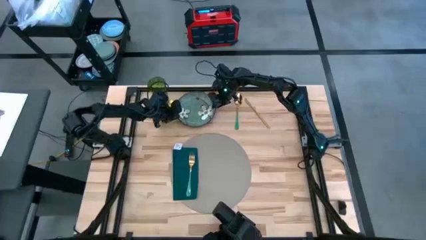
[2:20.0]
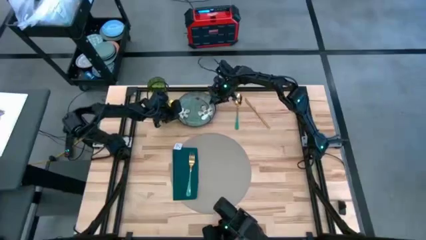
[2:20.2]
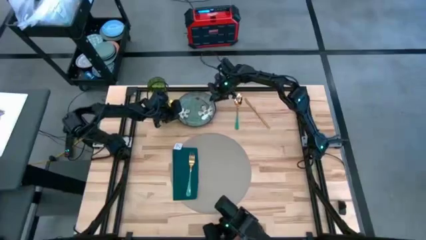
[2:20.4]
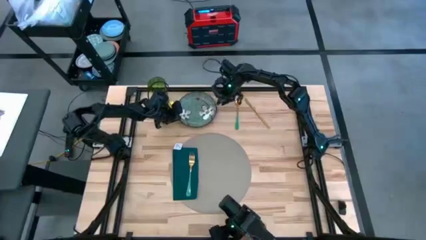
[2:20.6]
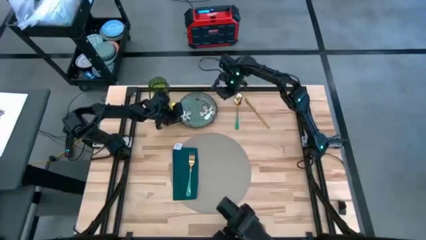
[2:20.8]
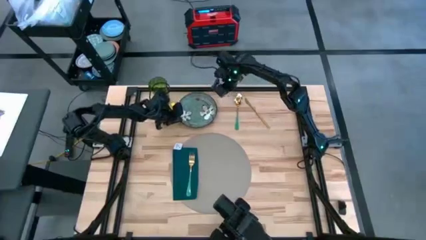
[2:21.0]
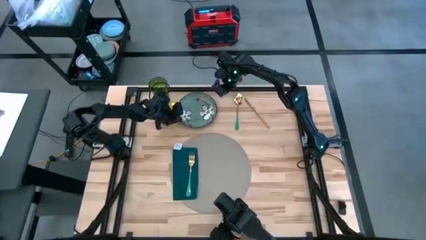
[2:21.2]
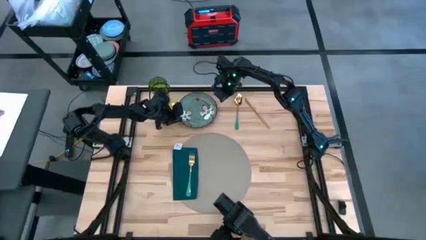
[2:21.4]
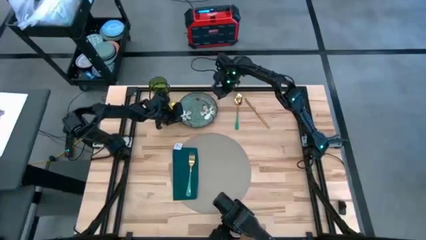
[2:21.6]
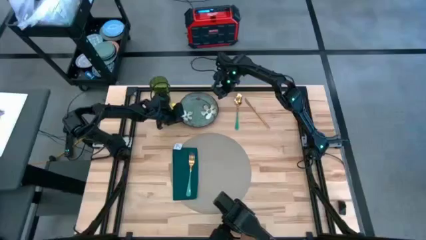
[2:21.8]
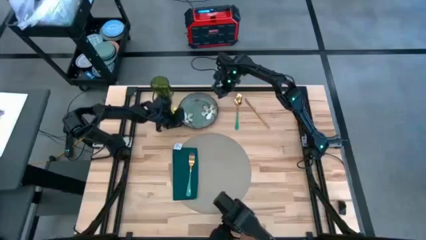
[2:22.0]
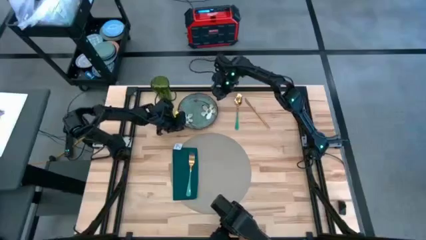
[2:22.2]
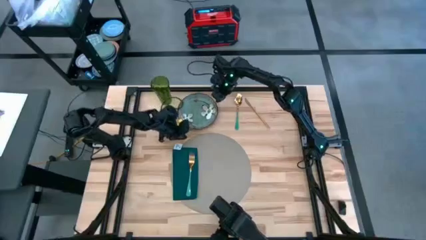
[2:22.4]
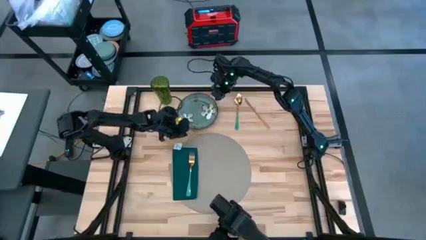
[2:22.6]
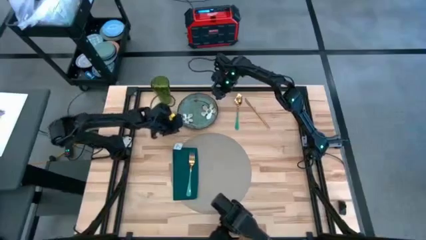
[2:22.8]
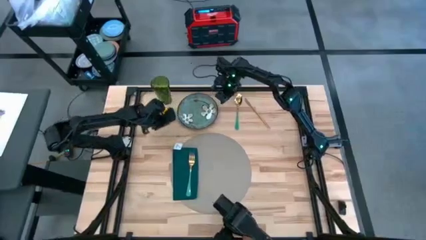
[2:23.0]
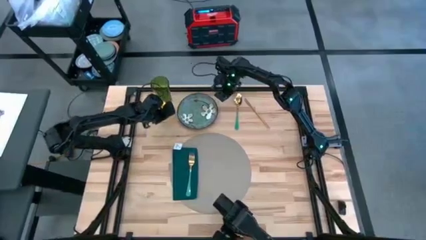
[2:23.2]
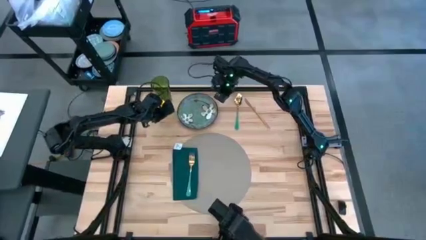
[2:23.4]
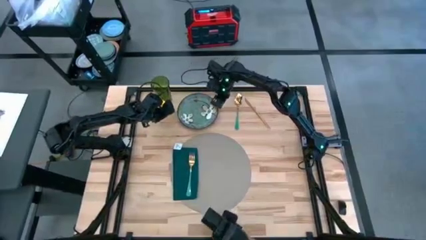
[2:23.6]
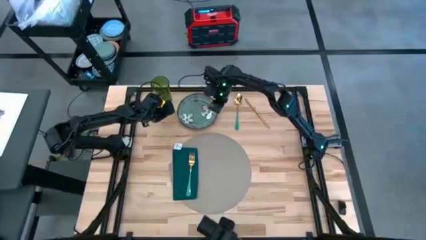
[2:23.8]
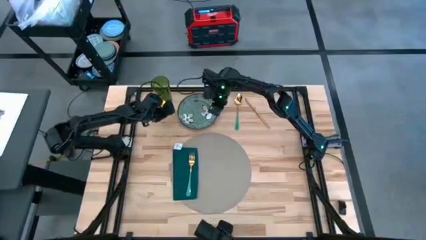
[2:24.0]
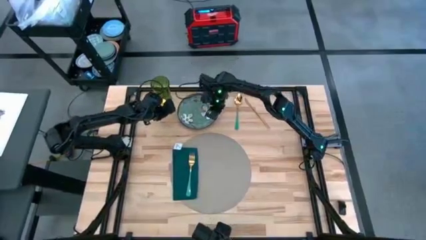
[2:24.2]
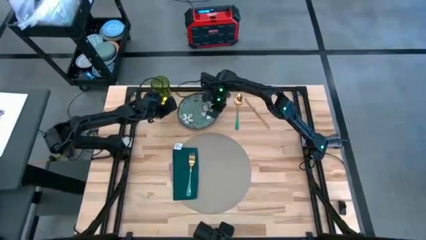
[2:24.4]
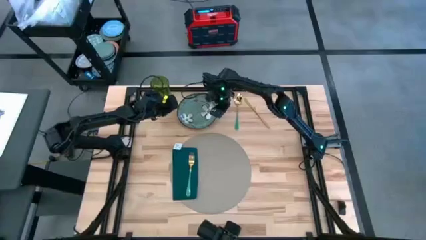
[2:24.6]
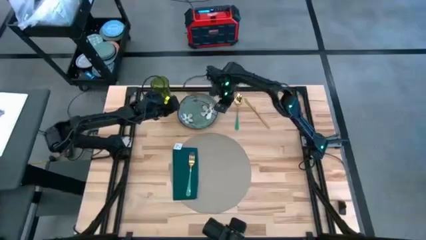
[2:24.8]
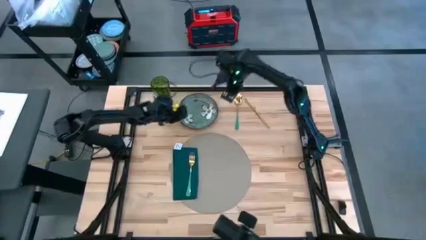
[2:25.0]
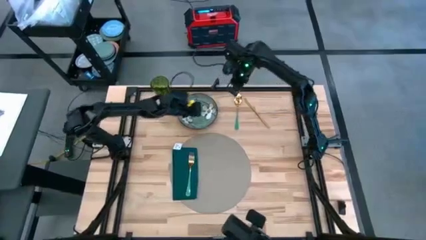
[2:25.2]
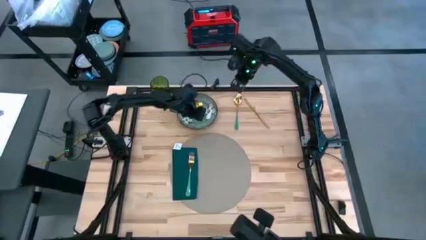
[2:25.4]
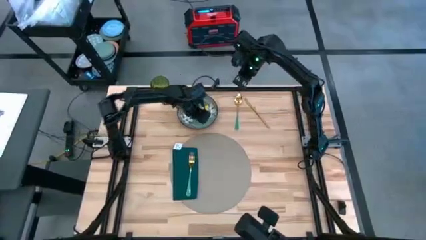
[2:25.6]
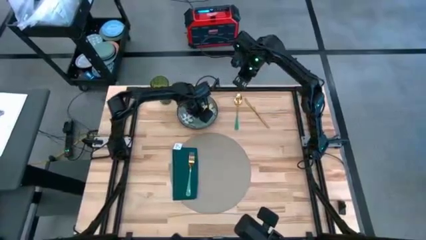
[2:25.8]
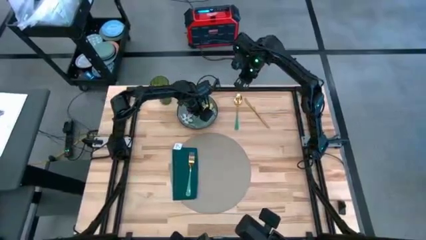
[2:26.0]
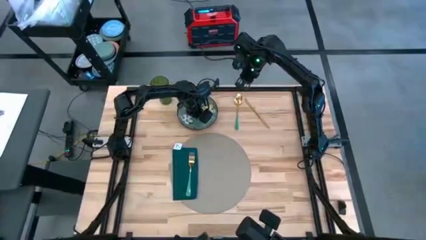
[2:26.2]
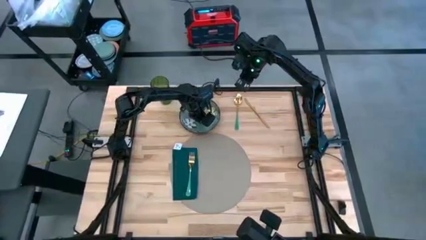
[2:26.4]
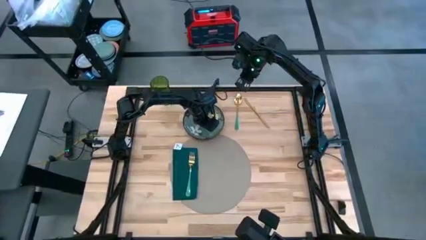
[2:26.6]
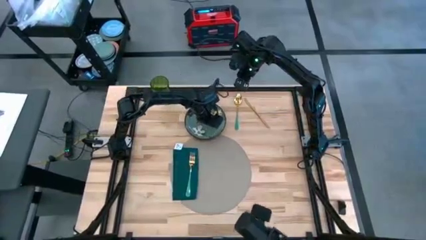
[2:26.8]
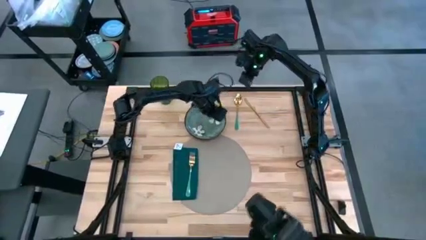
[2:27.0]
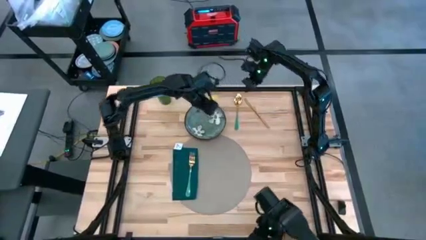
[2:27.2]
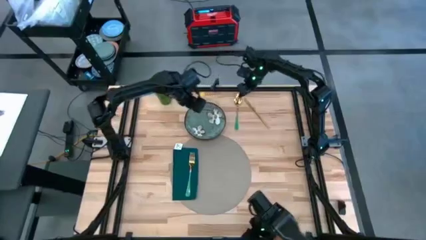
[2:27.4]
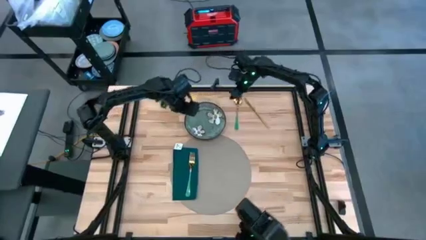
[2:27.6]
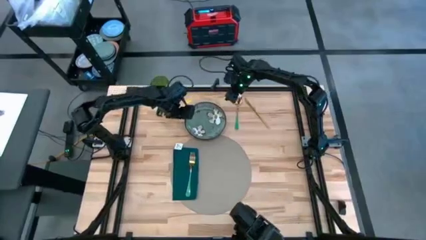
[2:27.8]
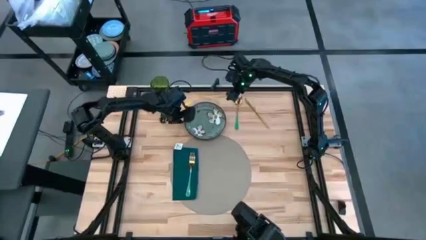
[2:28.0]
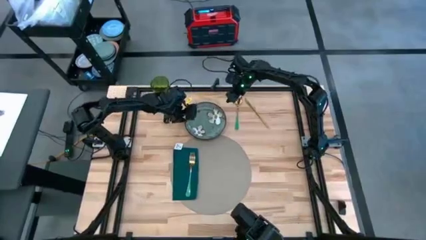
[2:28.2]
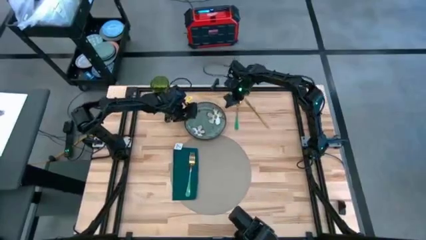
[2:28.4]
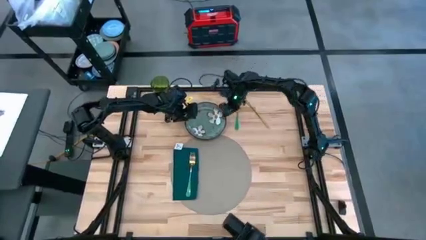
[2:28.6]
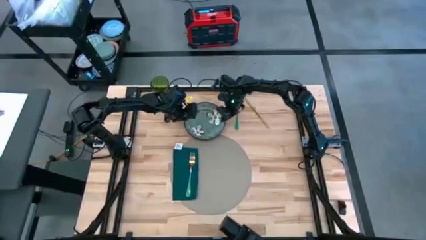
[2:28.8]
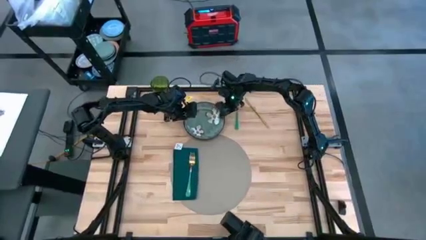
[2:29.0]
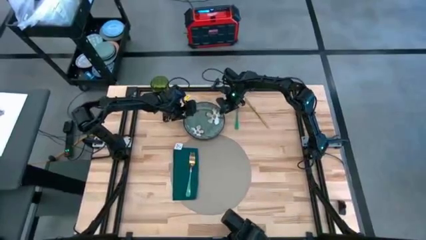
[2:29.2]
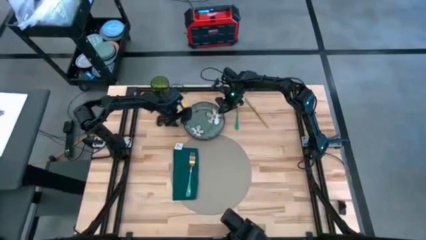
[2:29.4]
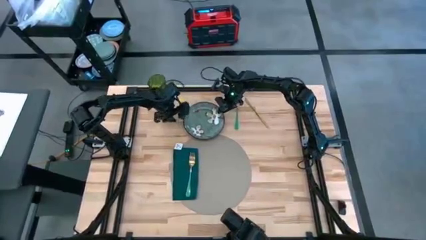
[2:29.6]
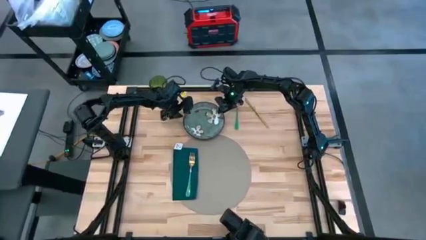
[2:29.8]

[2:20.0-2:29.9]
Task: Set table place
Put the green plate on the gray table mat

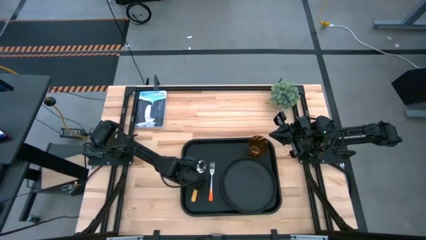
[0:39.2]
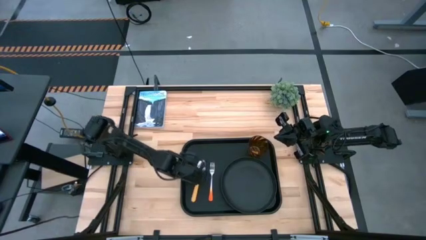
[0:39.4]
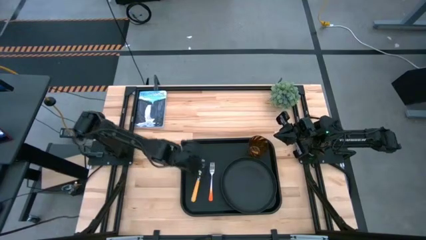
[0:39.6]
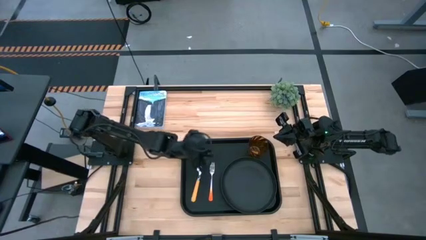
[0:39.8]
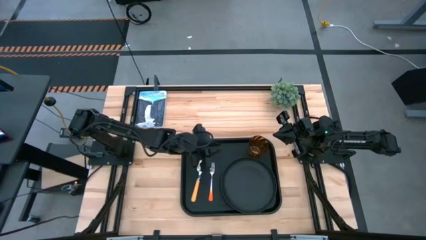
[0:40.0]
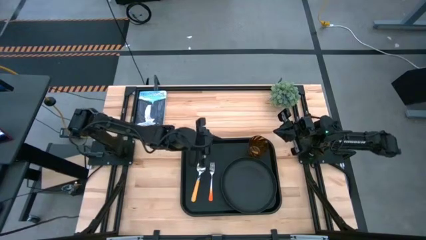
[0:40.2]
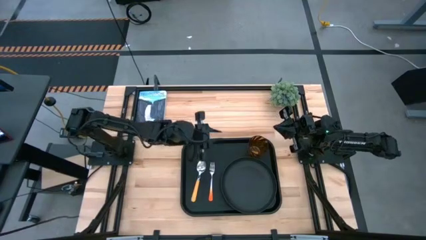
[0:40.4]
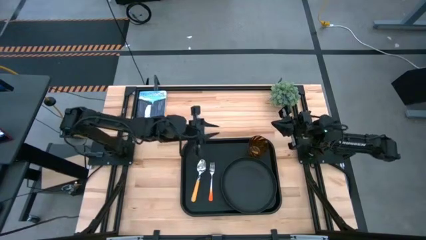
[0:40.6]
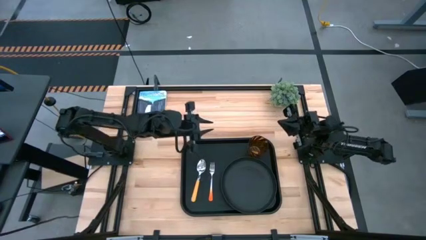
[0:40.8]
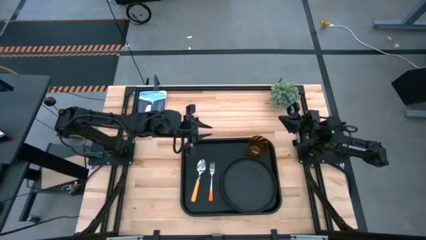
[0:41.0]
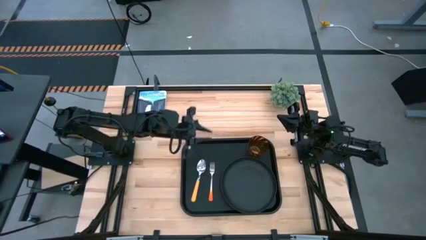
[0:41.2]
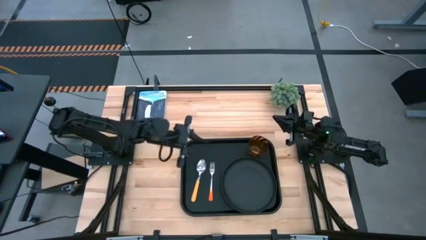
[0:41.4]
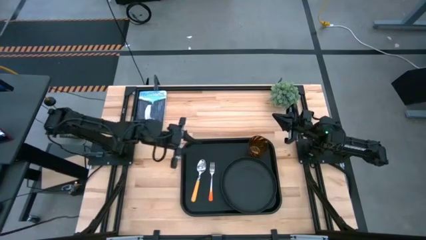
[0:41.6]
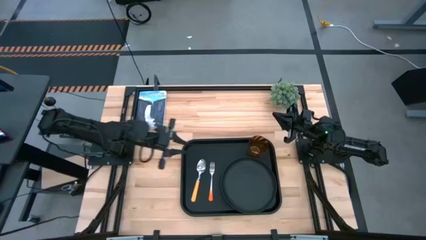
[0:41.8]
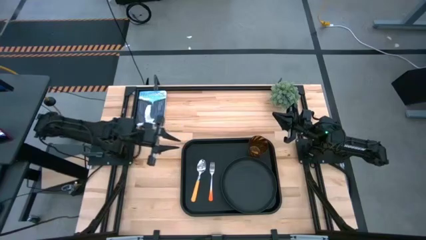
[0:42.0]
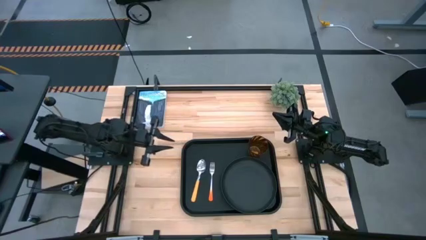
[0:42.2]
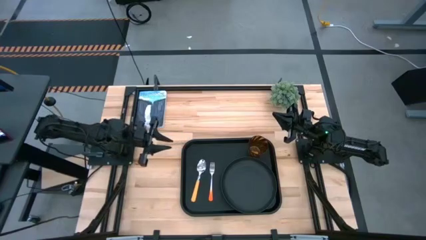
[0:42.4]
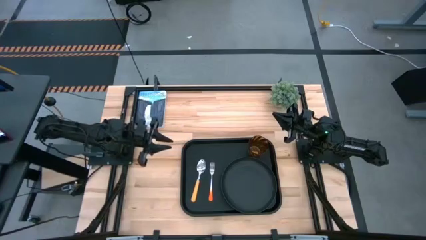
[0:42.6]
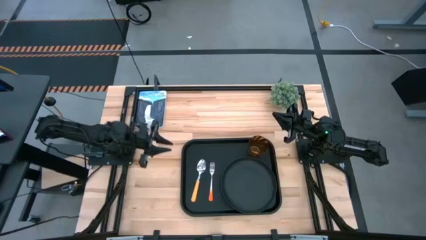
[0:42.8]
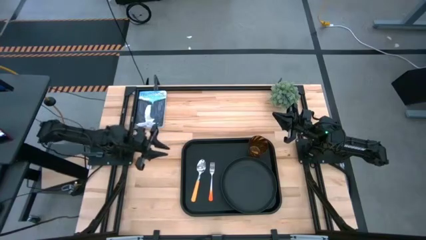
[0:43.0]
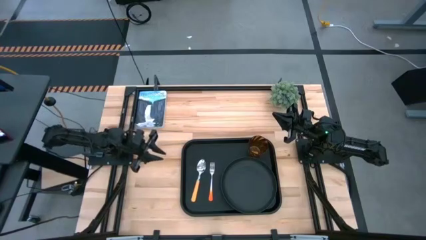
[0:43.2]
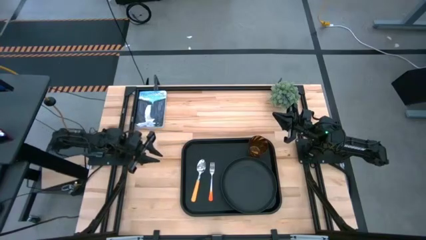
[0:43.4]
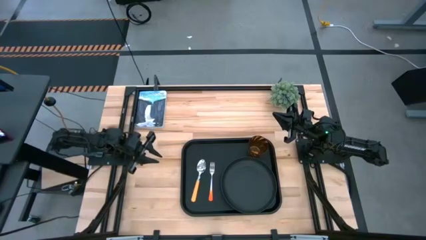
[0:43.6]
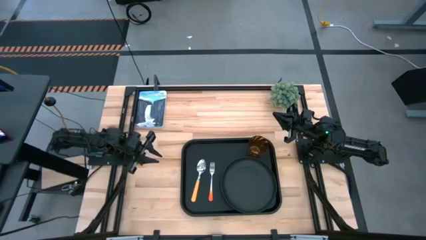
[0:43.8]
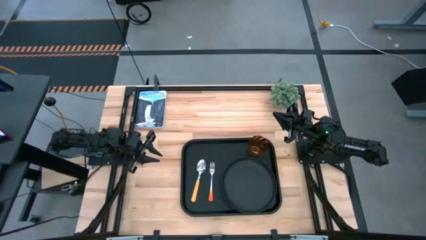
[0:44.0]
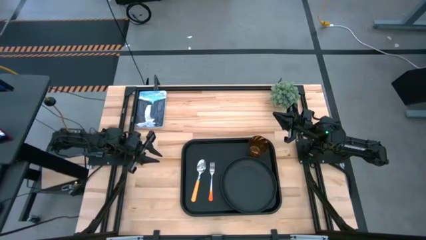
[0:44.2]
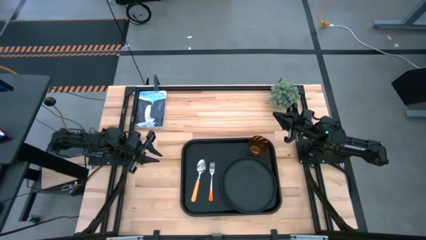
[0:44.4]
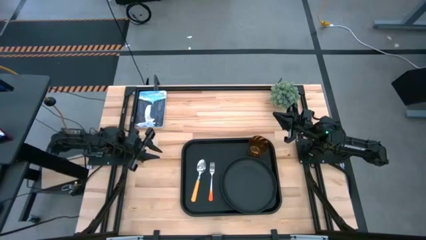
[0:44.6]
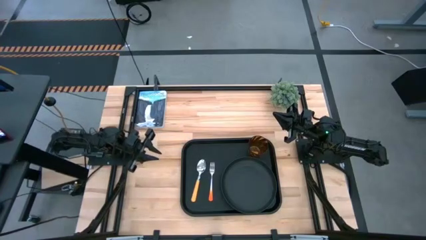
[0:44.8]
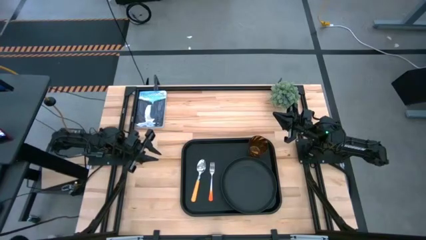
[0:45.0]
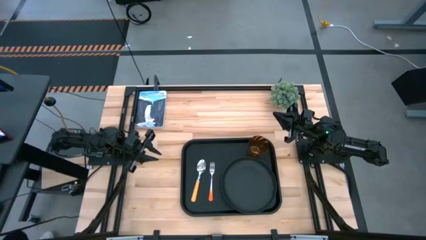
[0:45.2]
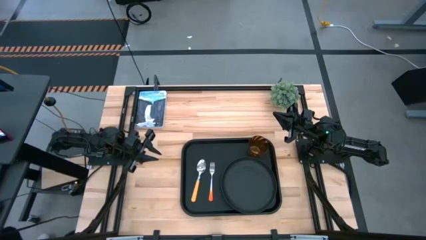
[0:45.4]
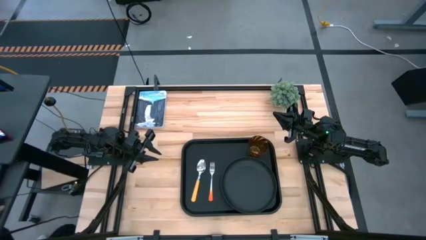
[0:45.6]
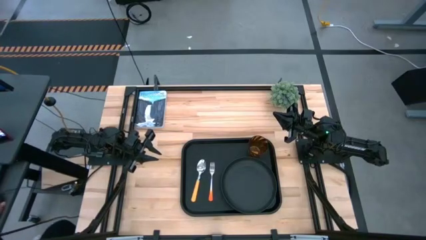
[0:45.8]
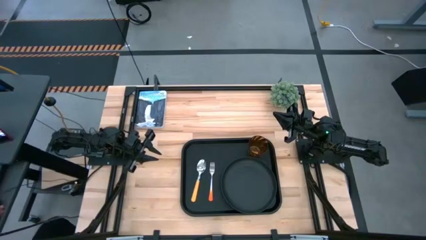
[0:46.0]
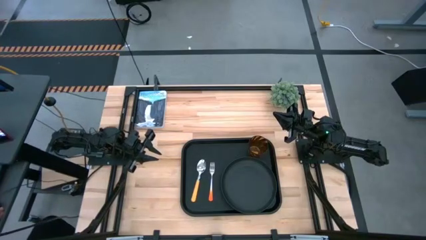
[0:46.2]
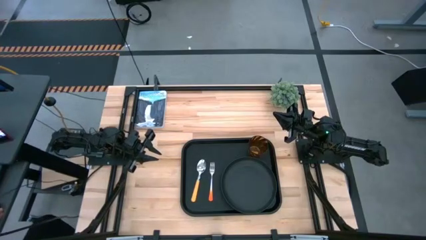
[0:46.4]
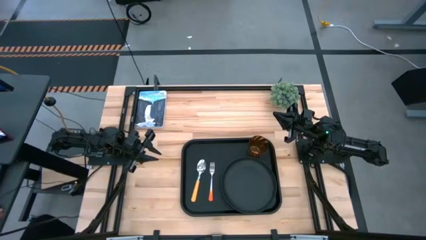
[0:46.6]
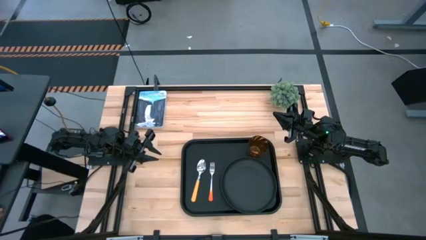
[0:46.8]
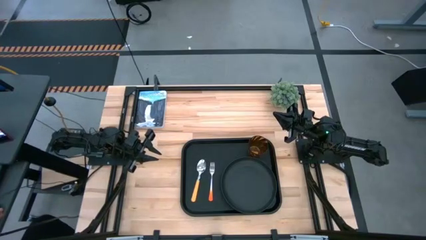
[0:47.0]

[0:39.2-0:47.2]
Task: Pick and place plate/cup/fork/spoon on tray
Return to Home Position
